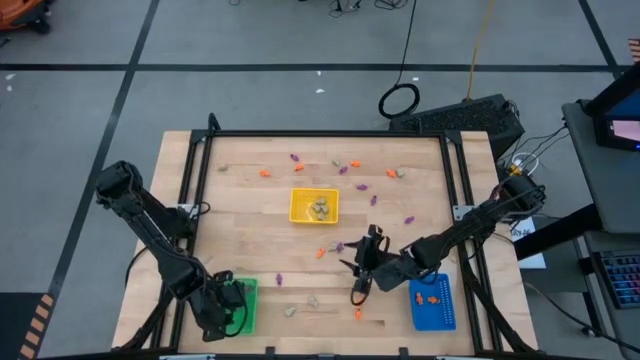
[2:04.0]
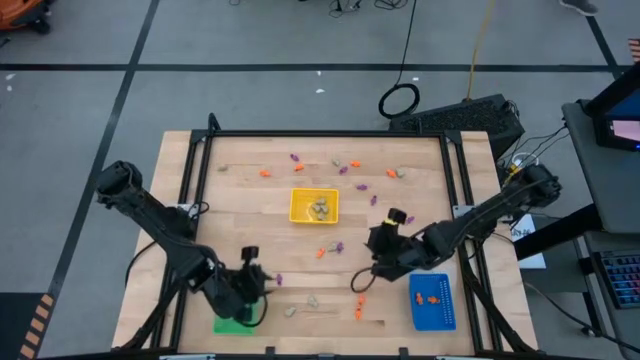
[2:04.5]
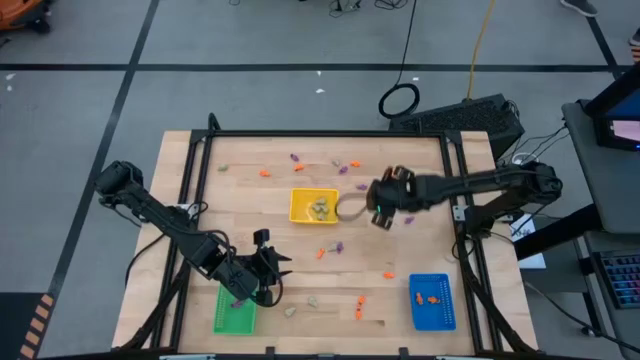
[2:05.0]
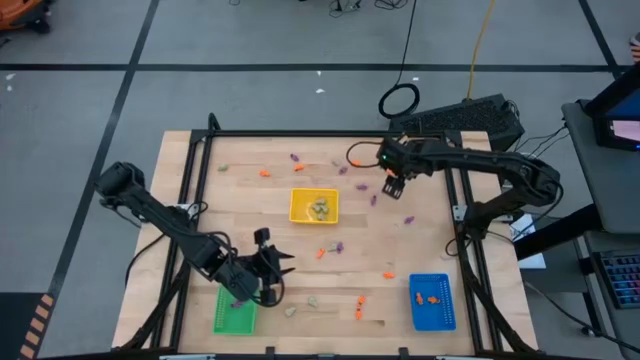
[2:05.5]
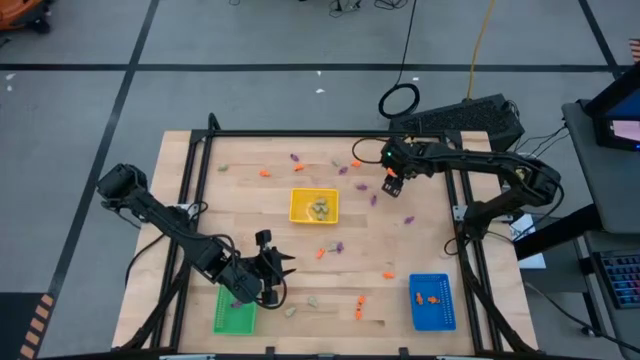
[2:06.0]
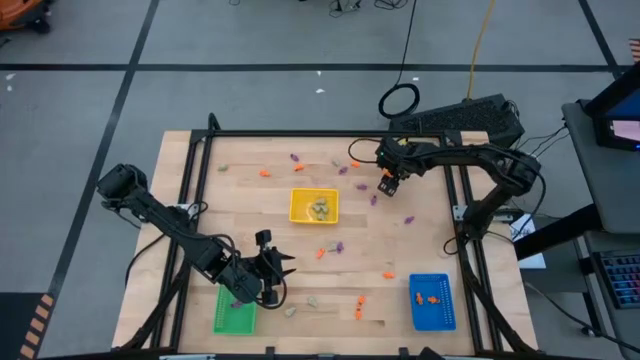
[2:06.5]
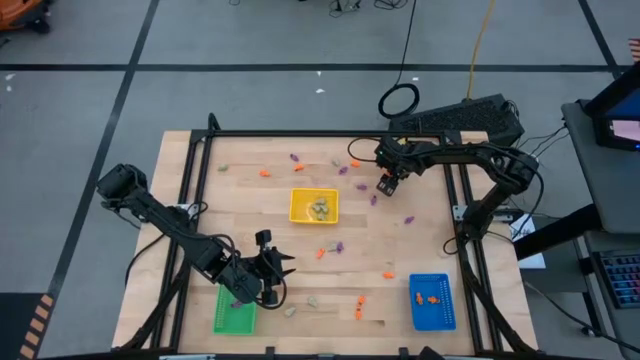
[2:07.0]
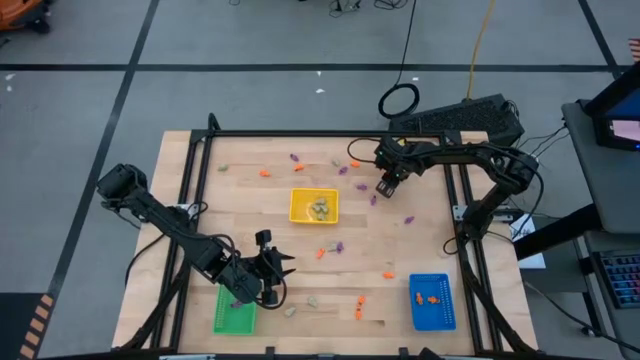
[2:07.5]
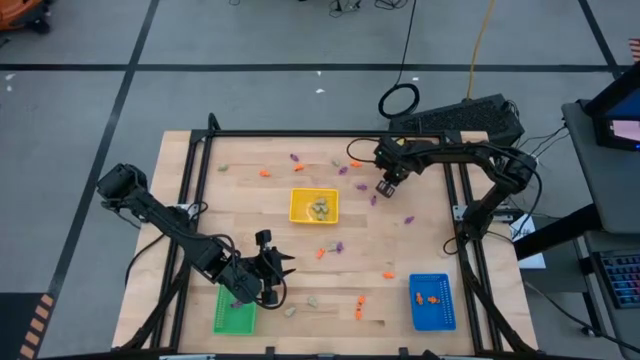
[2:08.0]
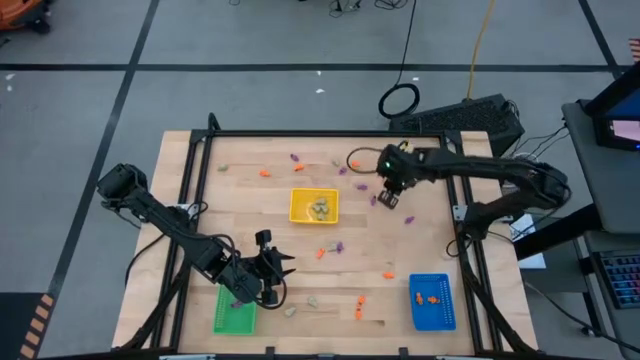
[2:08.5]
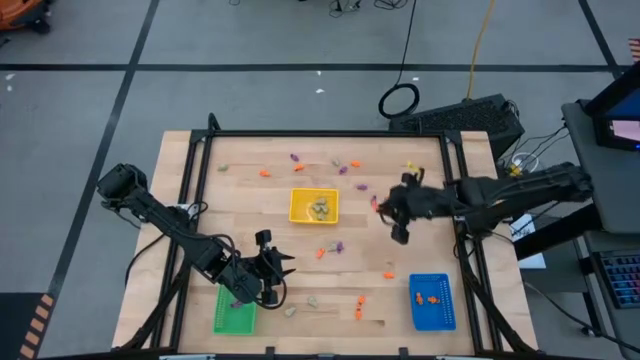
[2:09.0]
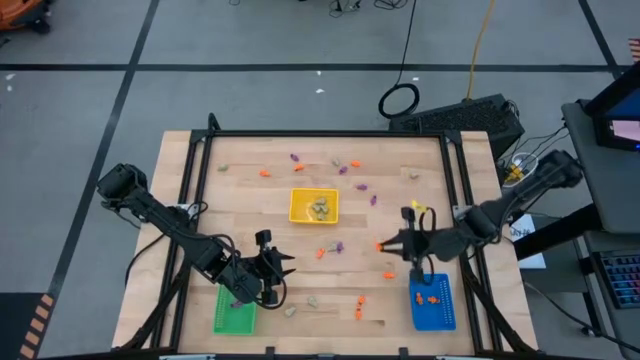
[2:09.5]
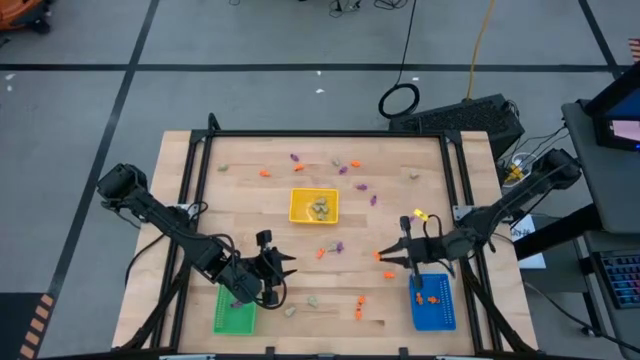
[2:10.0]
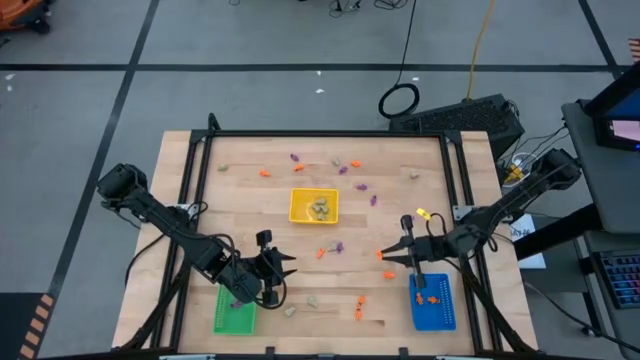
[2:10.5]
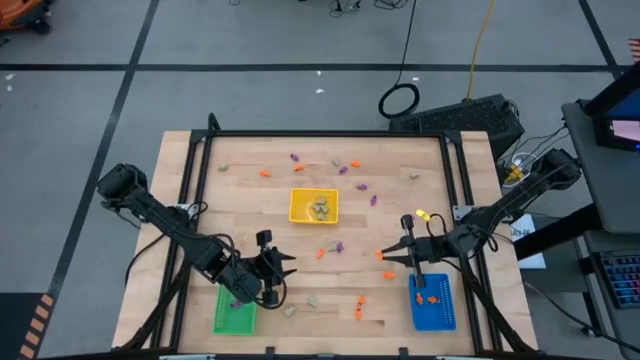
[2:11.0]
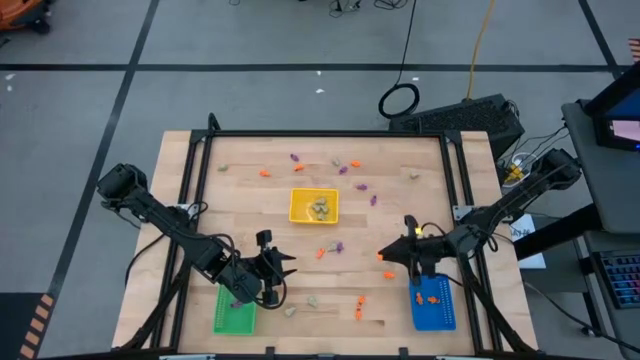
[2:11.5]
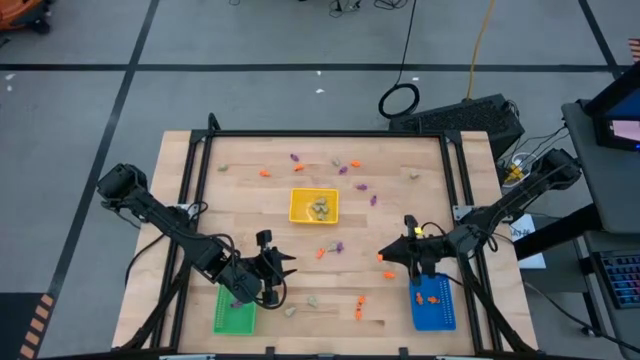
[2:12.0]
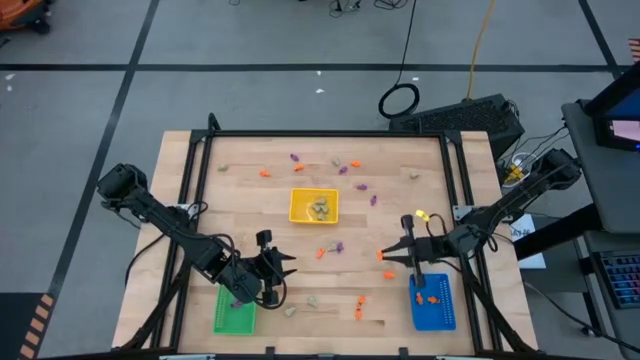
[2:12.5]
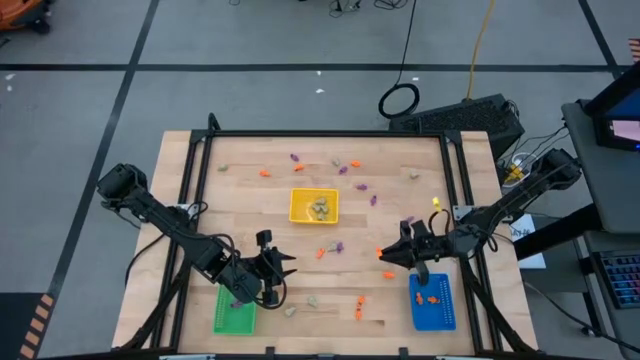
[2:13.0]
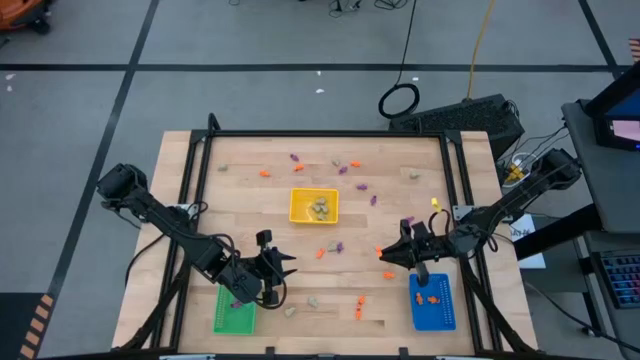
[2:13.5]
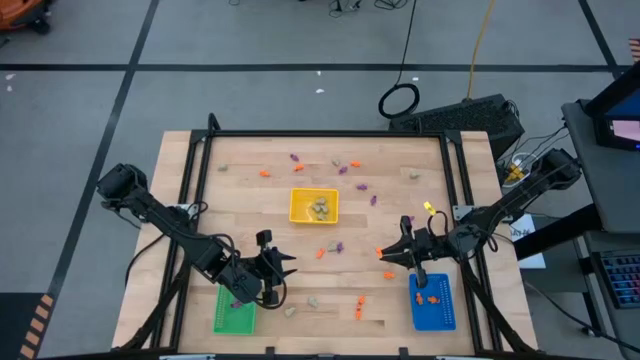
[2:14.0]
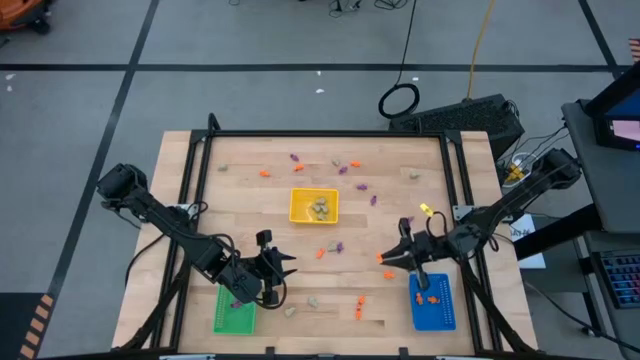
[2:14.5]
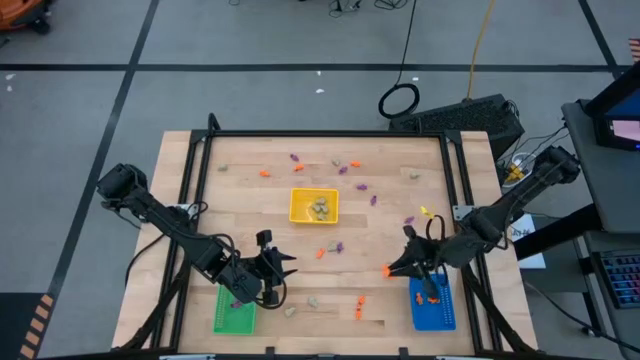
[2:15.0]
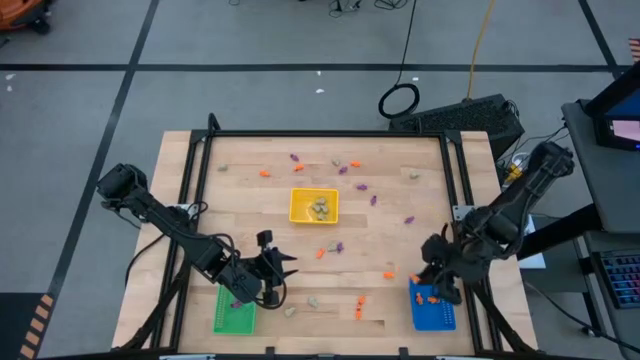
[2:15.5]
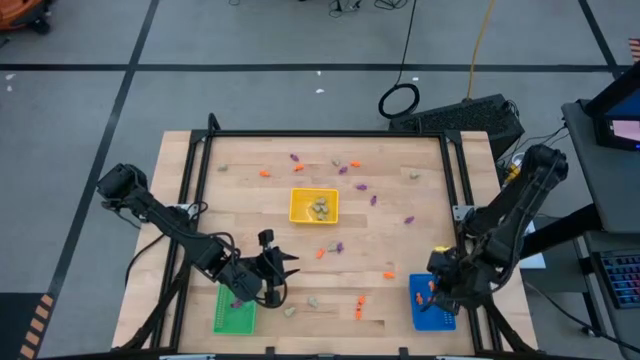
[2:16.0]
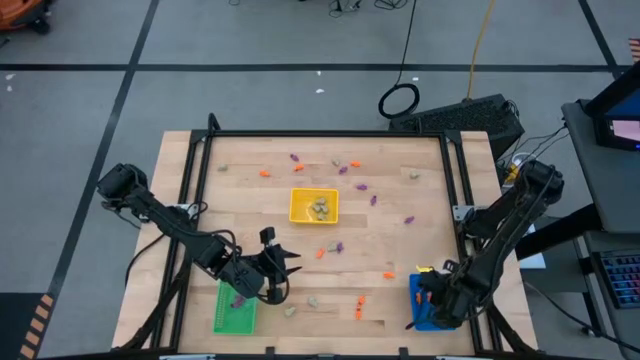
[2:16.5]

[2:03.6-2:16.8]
Task: Sort Halloween decoration
Put the orange skeleton toy in the blue basket

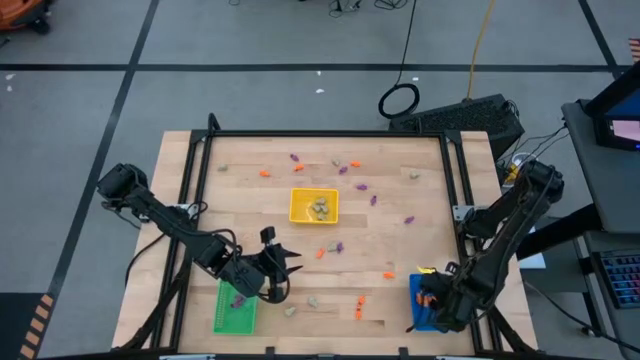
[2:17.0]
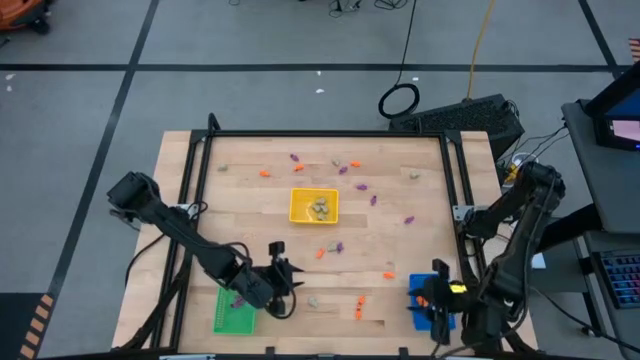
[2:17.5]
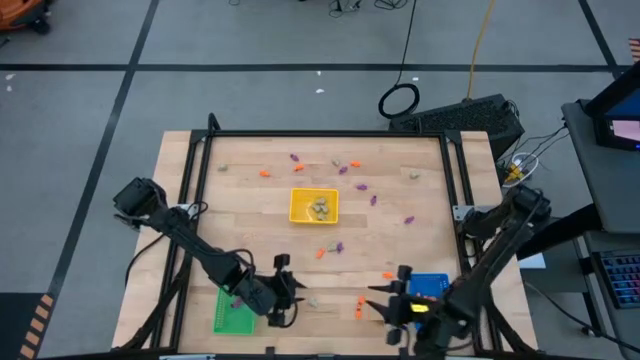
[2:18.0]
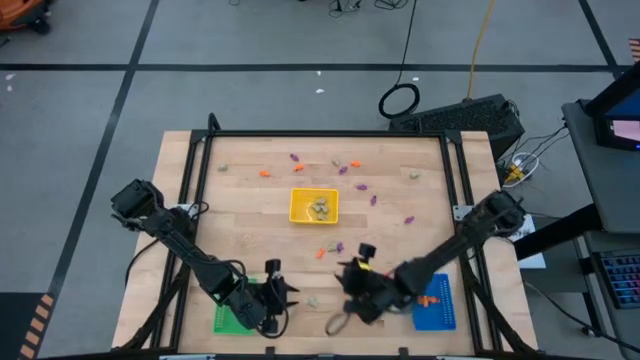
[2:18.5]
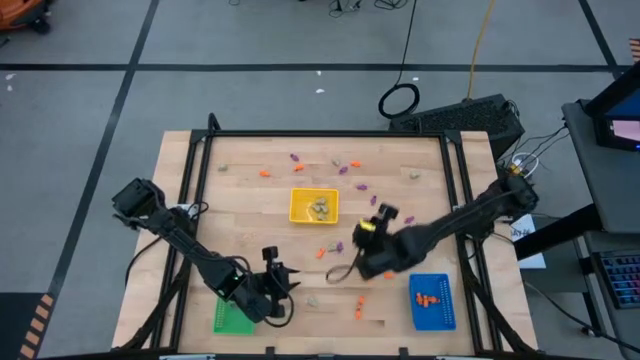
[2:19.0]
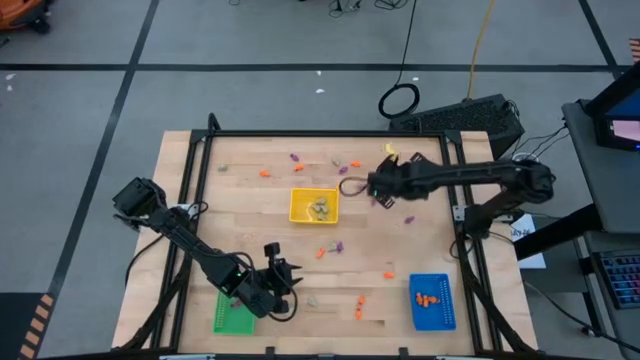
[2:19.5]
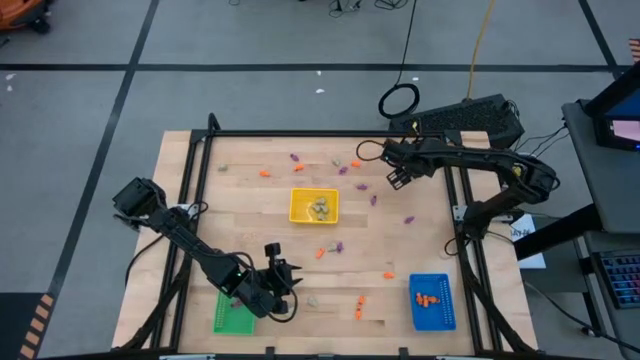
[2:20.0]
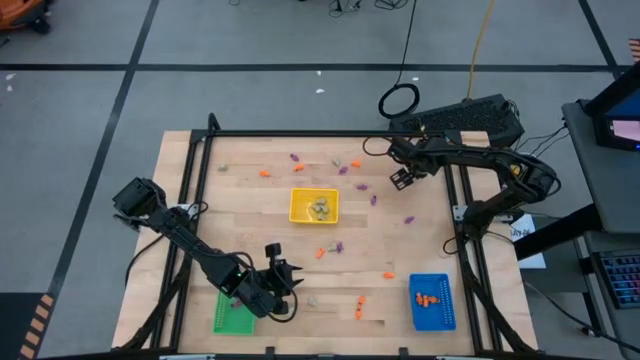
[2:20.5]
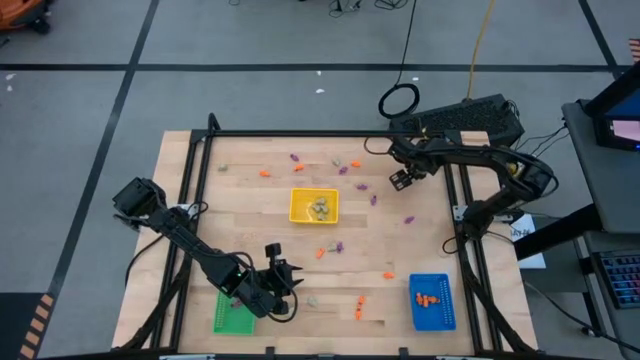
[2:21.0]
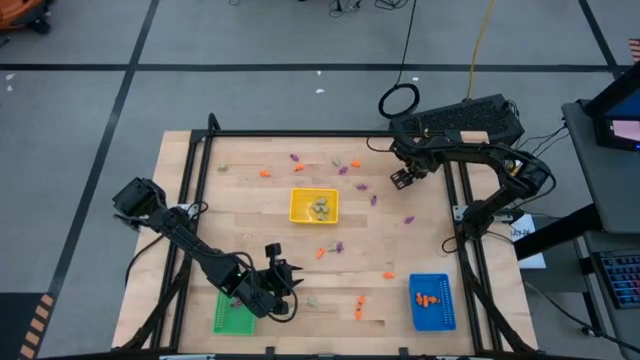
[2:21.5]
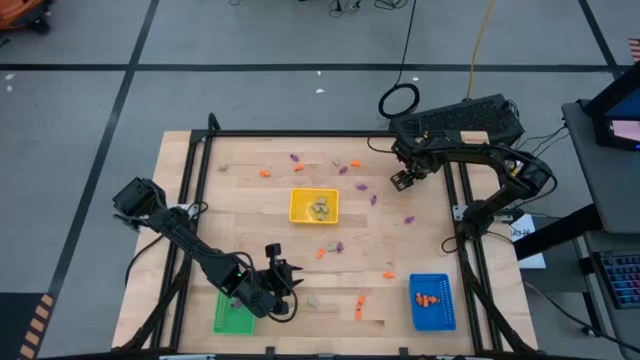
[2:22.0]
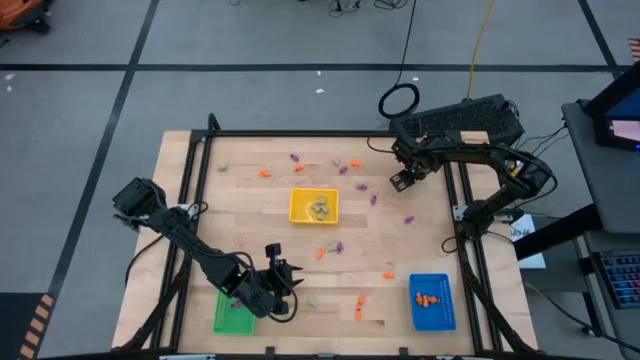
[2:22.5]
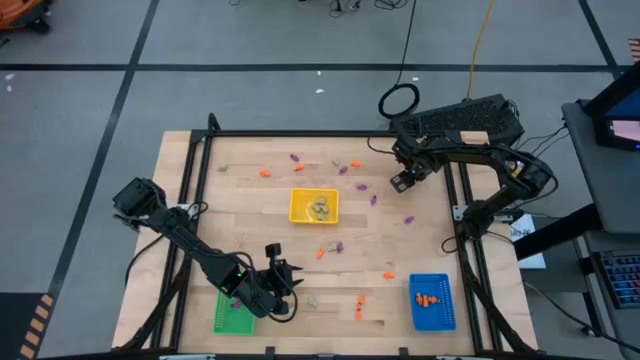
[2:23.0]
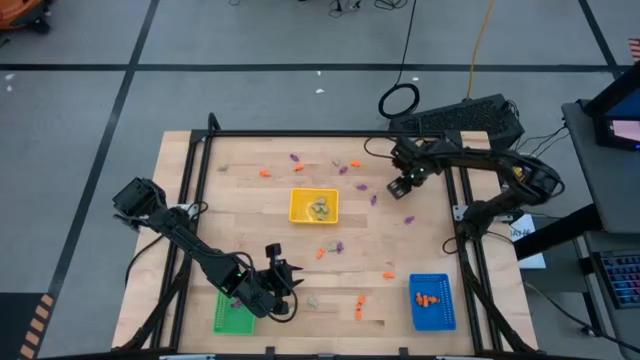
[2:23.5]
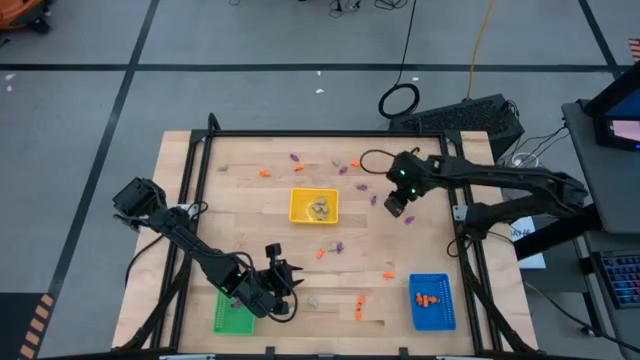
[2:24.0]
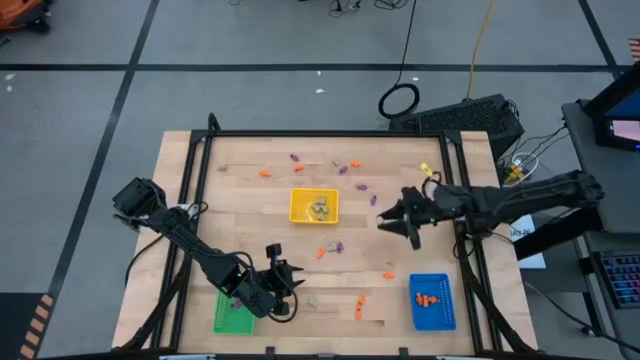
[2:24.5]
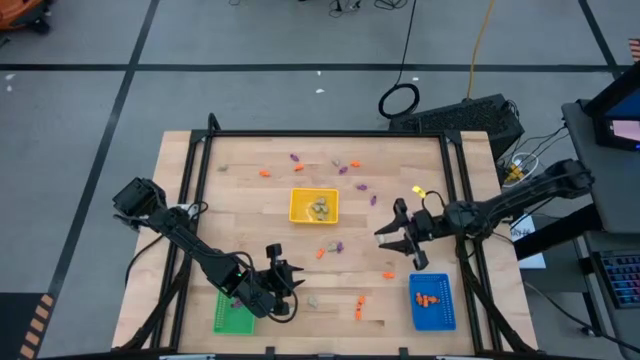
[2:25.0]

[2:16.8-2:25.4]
Put the white skull toy in the yellow basket

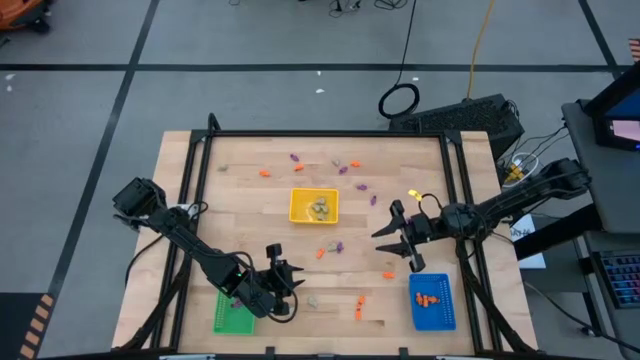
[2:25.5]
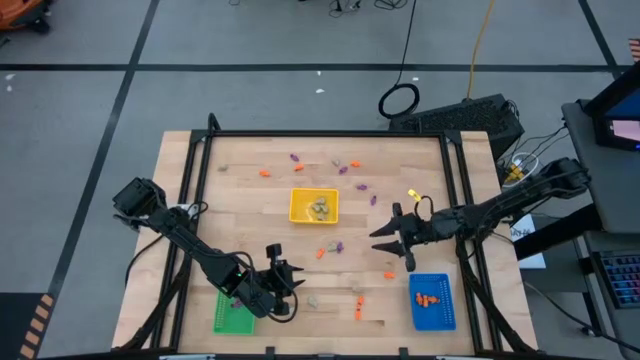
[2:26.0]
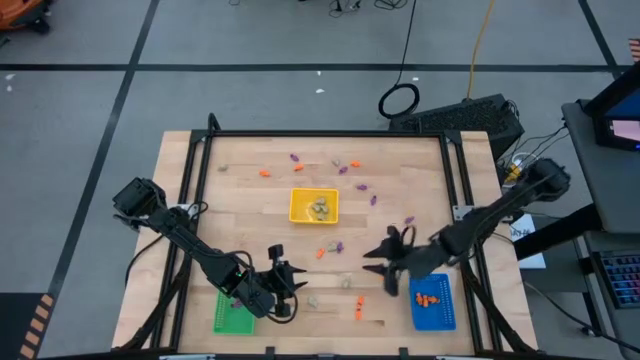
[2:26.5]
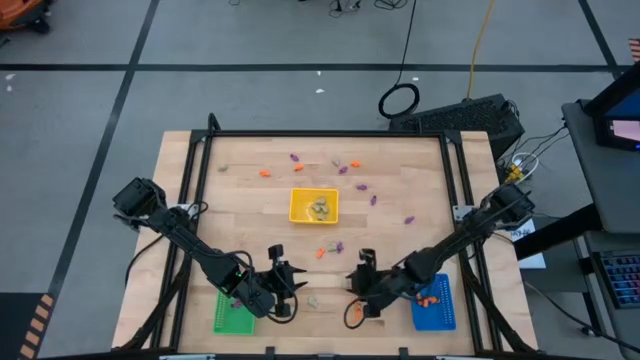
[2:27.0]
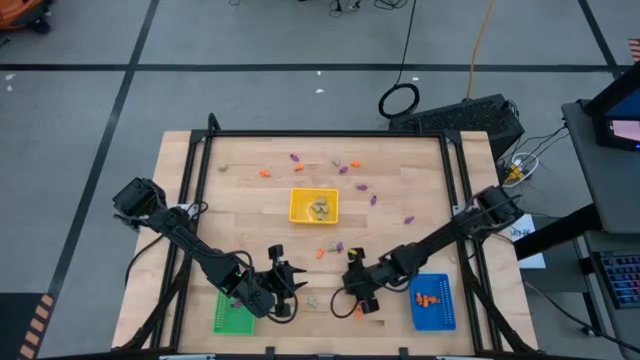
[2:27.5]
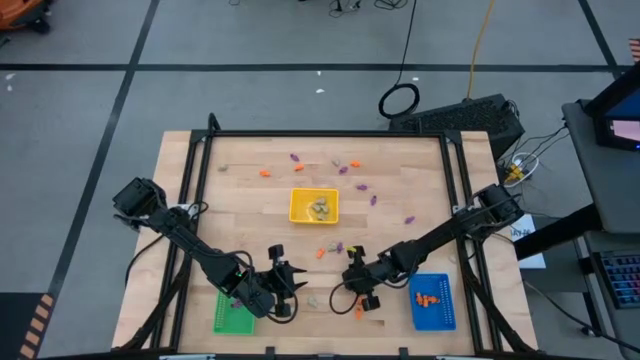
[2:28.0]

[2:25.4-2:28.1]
Put the white skull toy in the yellow basket
